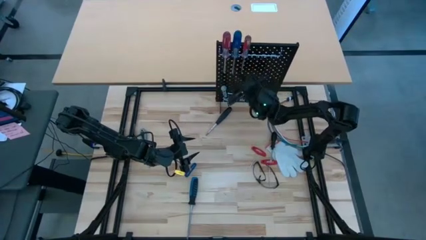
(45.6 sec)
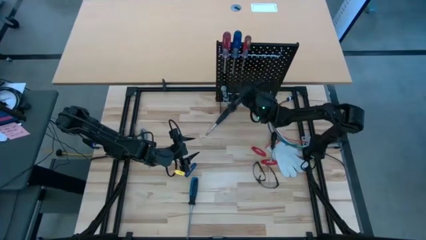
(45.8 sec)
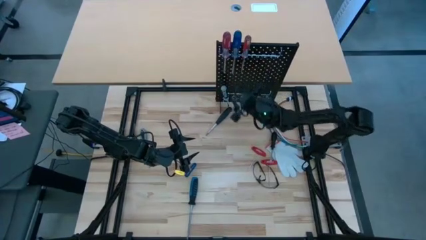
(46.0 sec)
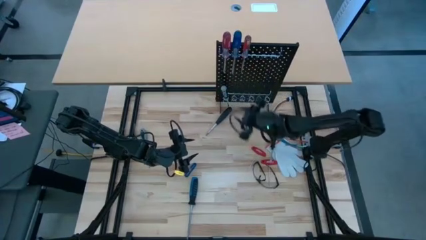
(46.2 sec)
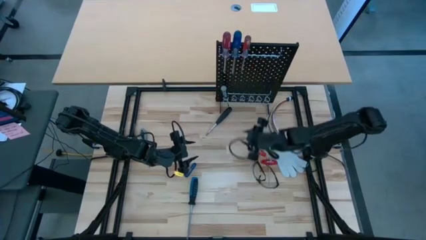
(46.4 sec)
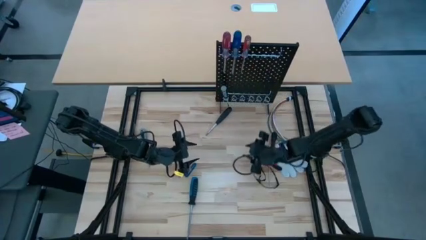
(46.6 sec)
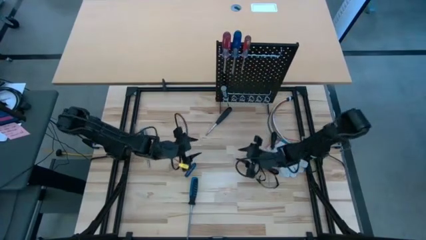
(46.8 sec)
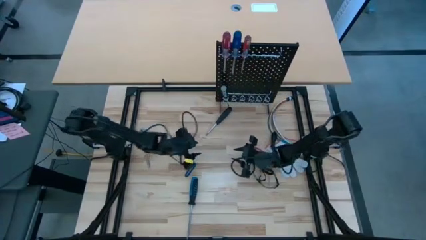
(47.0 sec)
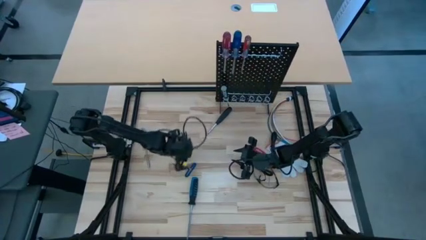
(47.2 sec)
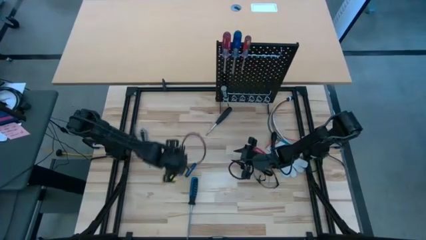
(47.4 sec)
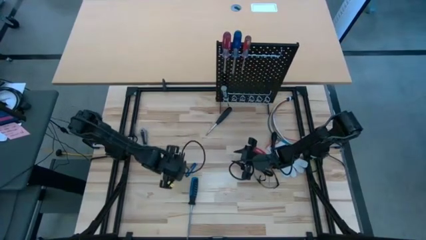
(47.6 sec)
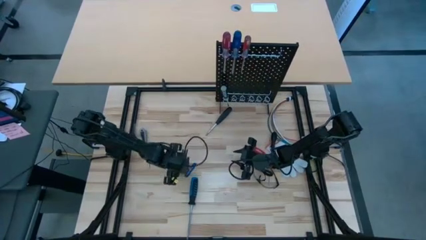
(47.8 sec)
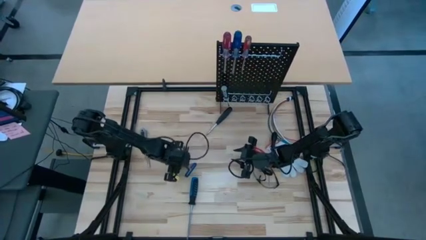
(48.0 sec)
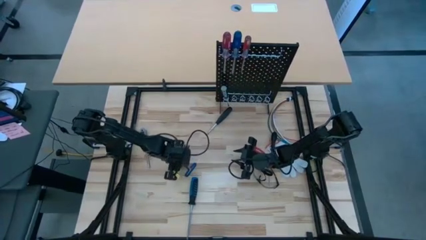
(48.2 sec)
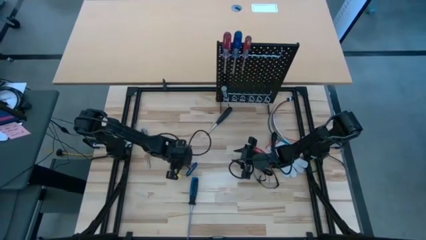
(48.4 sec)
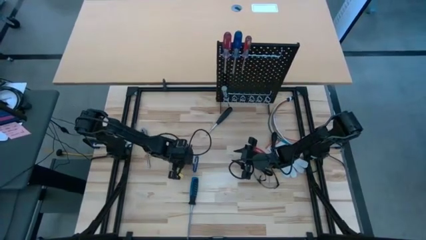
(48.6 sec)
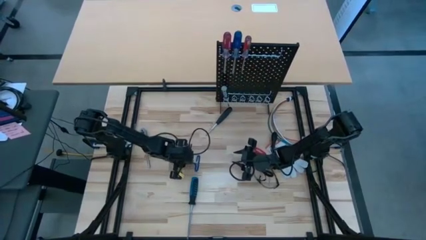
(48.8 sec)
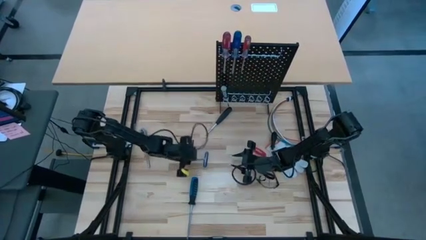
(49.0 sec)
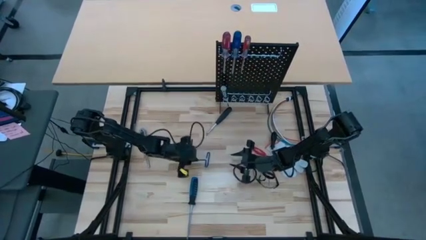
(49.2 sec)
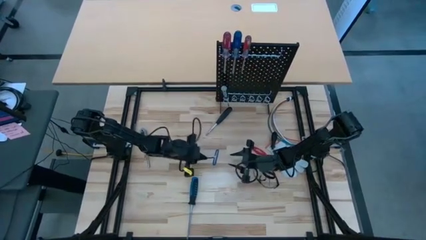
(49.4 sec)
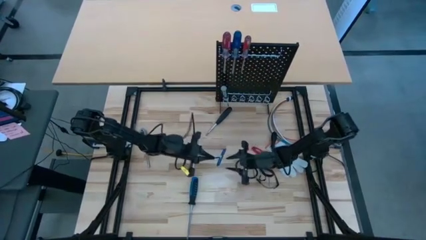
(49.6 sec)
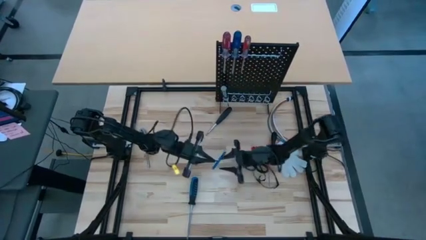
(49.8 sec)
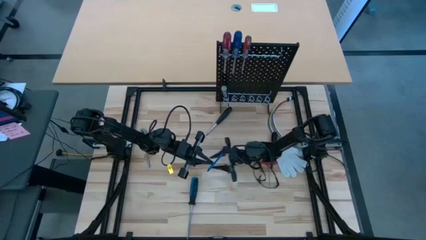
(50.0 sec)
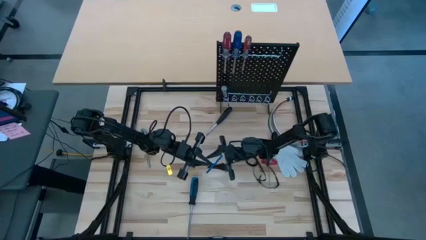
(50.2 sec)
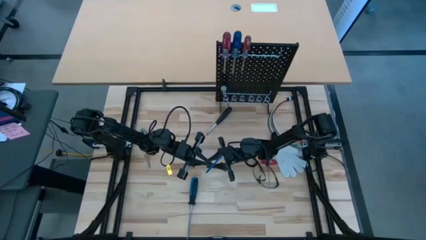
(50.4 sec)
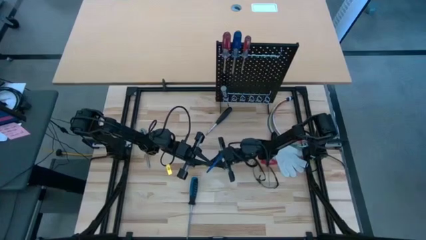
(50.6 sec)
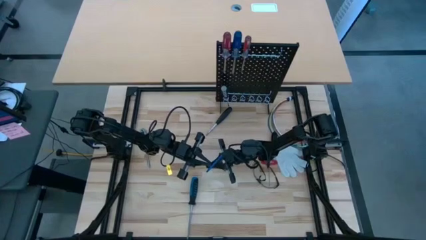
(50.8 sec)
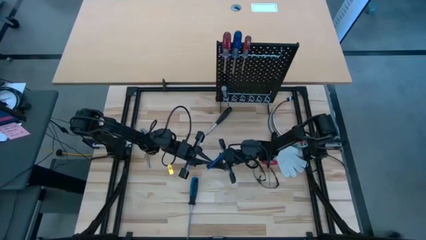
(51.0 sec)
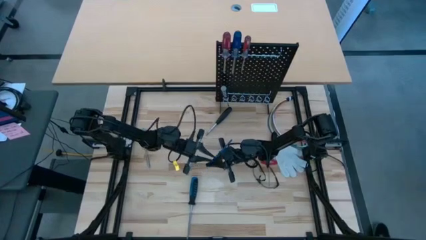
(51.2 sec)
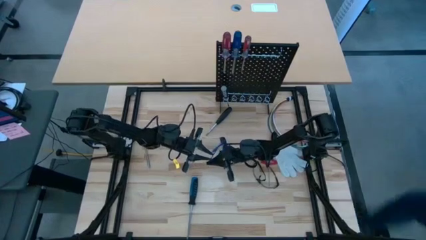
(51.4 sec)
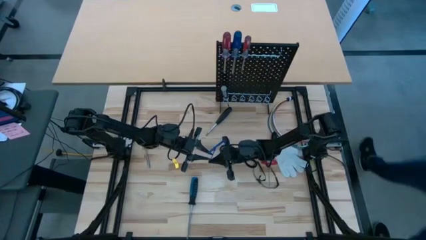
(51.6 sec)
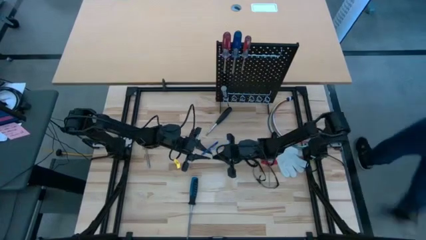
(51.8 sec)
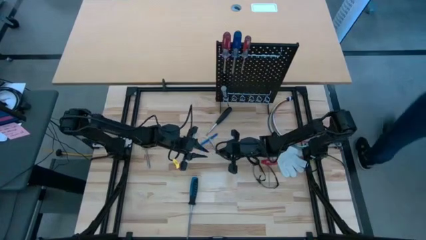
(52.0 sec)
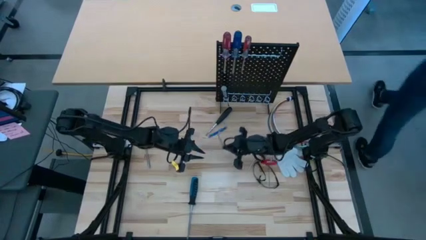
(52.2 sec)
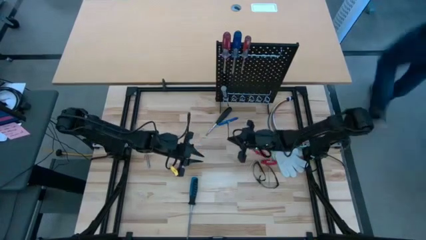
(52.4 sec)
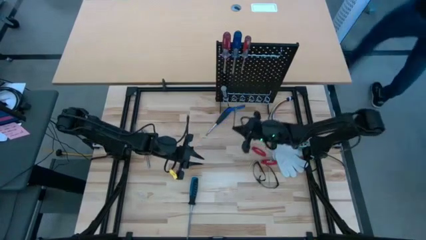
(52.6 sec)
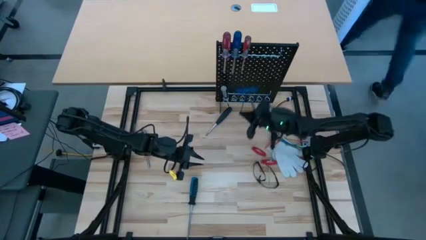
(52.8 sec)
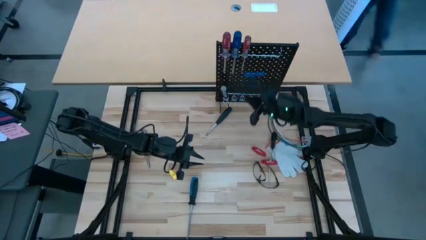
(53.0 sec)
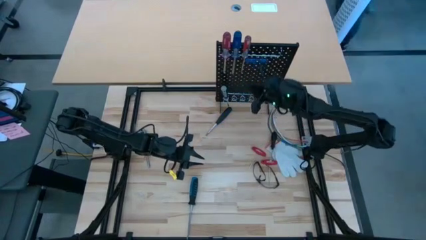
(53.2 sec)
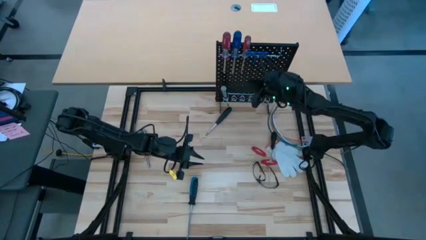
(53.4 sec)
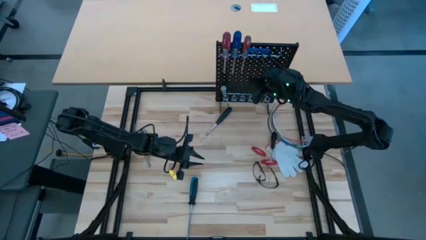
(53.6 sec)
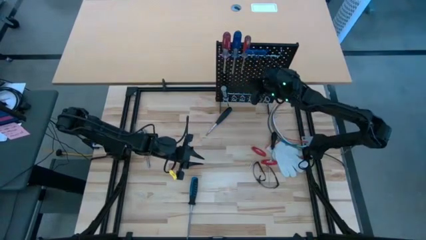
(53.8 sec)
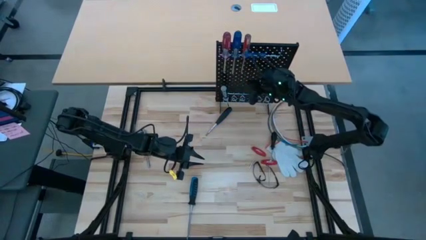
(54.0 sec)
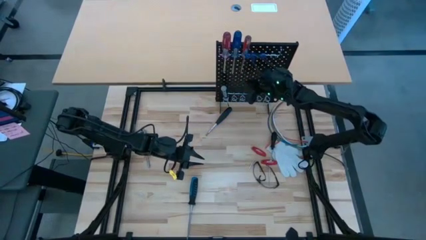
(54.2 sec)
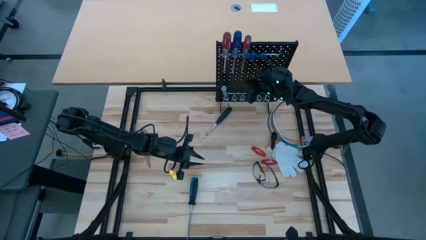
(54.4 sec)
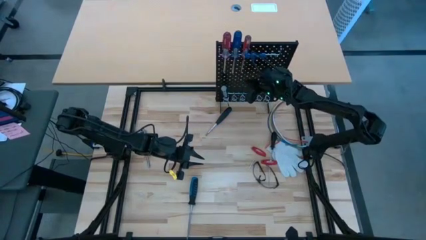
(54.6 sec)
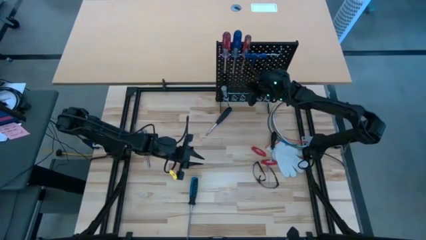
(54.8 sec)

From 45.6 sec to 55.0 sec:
Task: Hang tools onto peg board
Hang the blue pick tool on the pegboard

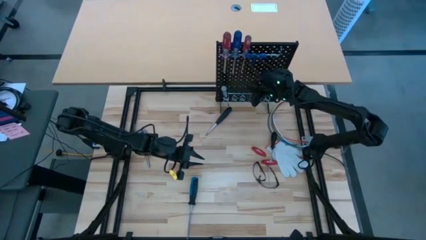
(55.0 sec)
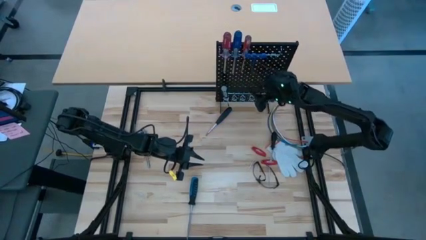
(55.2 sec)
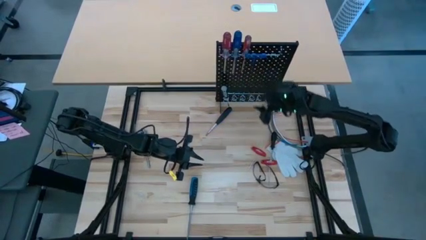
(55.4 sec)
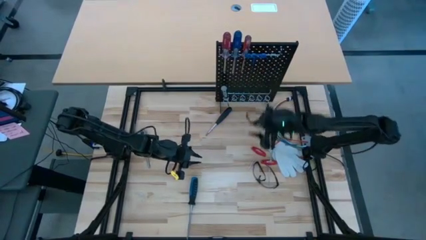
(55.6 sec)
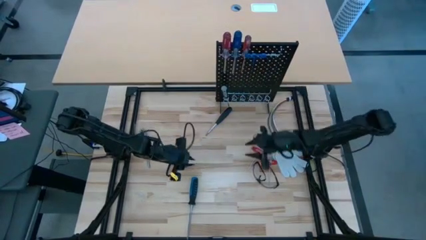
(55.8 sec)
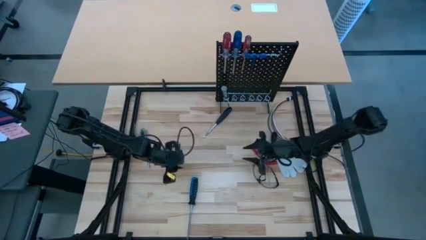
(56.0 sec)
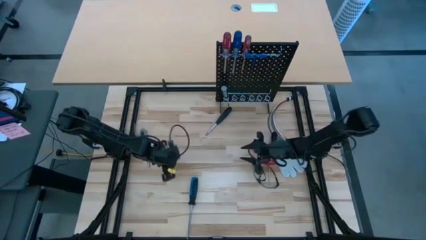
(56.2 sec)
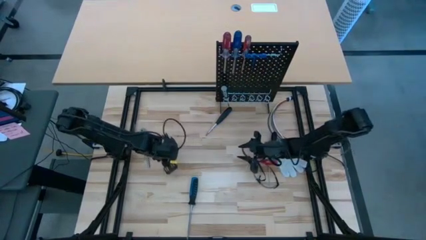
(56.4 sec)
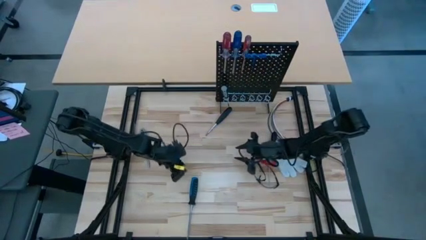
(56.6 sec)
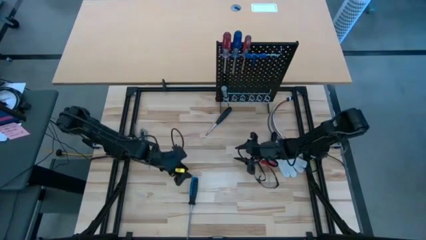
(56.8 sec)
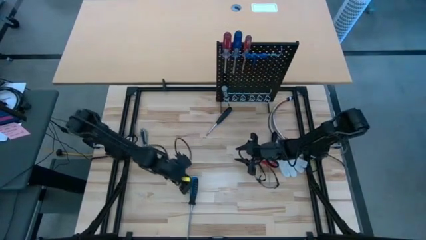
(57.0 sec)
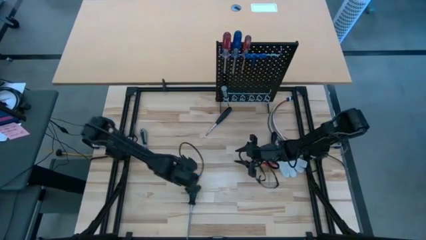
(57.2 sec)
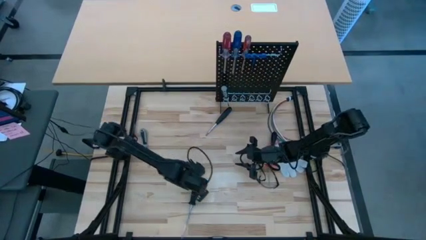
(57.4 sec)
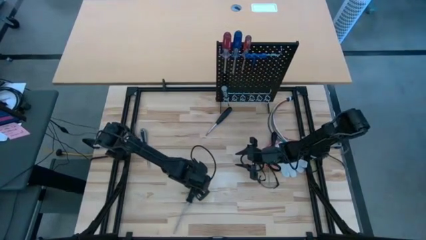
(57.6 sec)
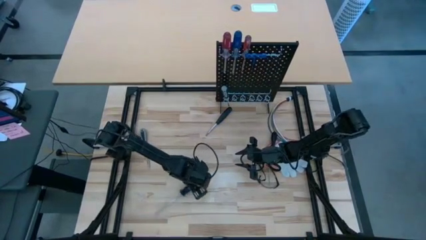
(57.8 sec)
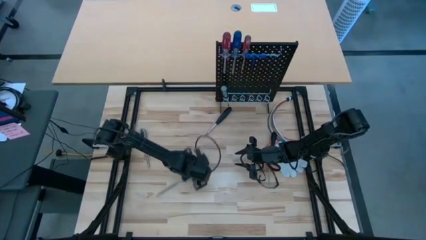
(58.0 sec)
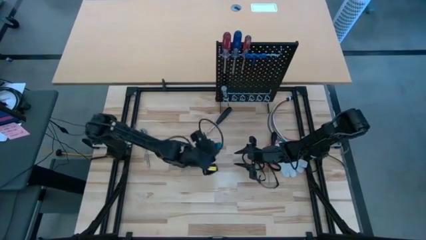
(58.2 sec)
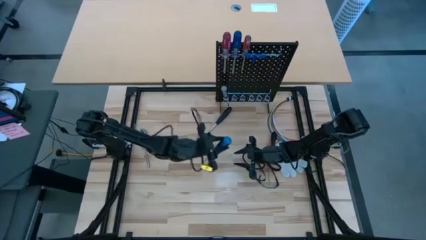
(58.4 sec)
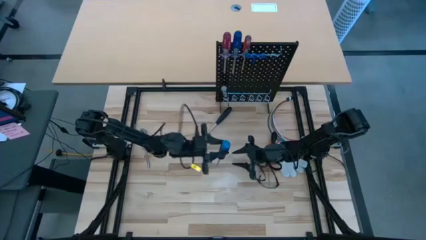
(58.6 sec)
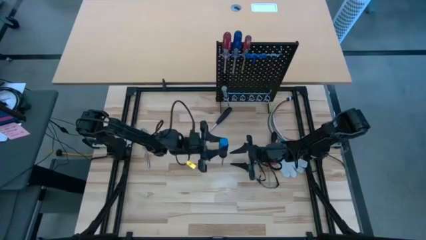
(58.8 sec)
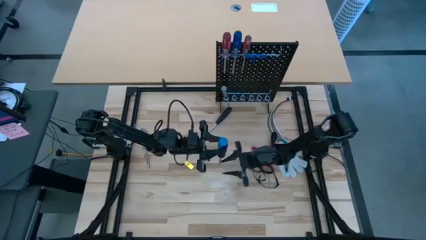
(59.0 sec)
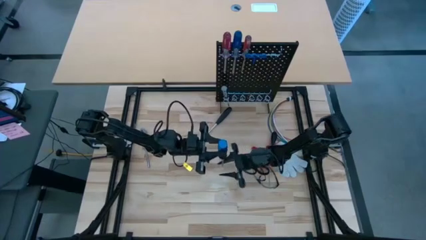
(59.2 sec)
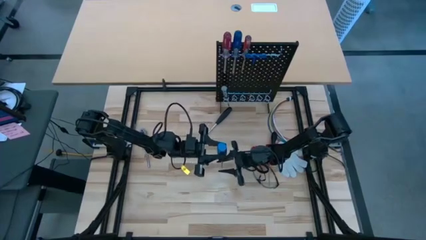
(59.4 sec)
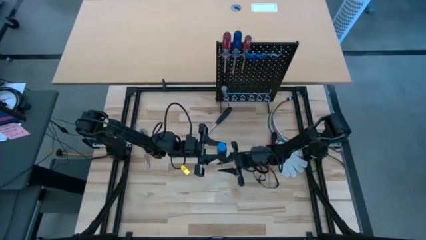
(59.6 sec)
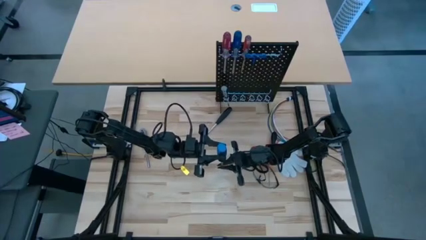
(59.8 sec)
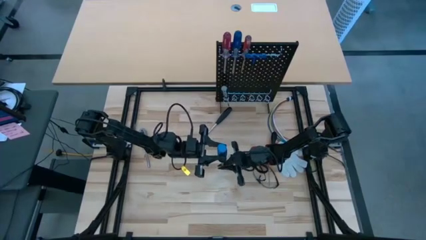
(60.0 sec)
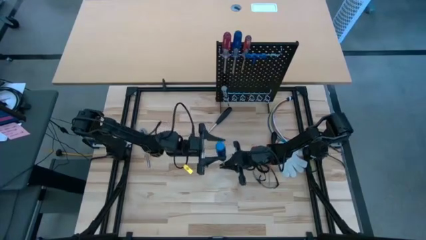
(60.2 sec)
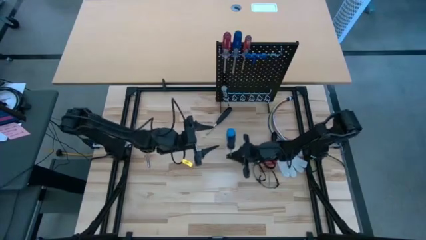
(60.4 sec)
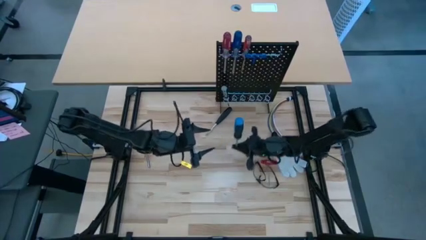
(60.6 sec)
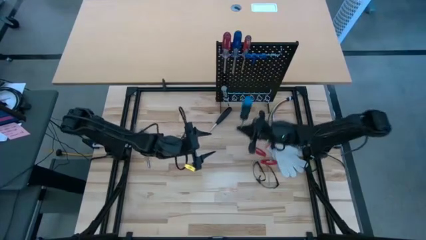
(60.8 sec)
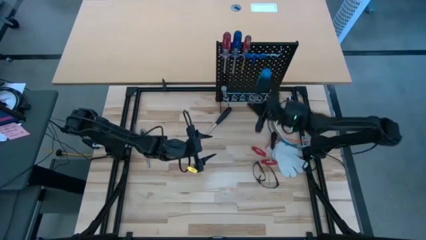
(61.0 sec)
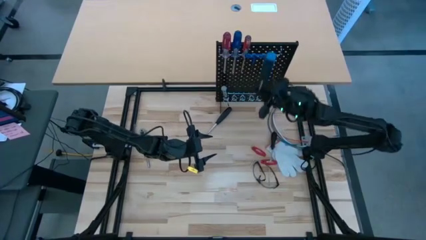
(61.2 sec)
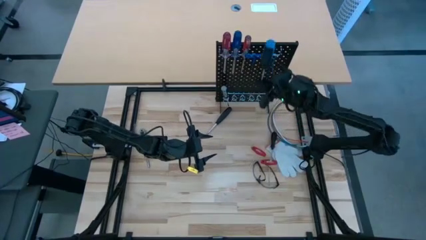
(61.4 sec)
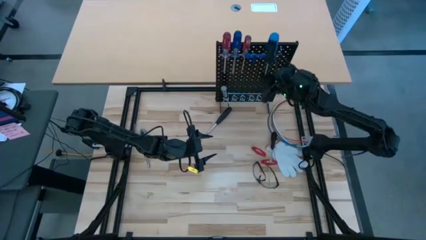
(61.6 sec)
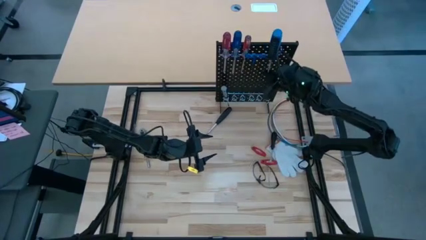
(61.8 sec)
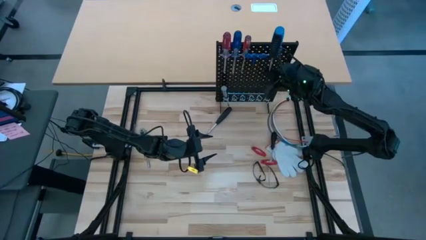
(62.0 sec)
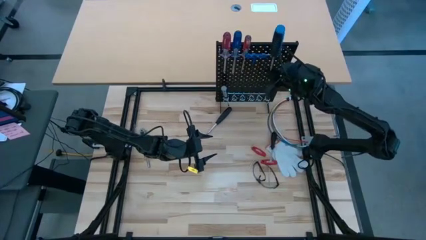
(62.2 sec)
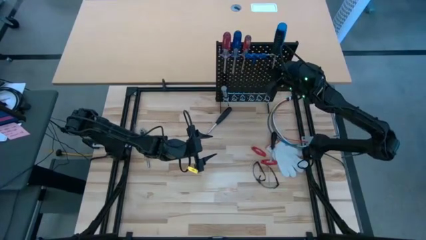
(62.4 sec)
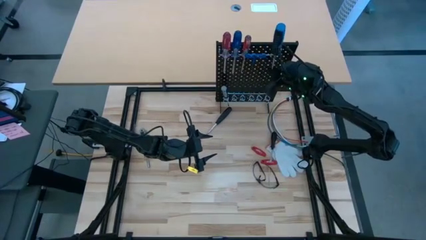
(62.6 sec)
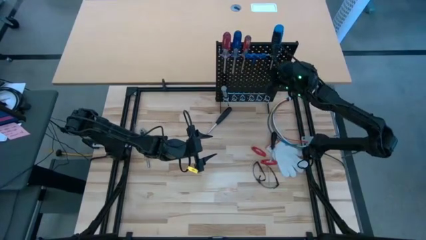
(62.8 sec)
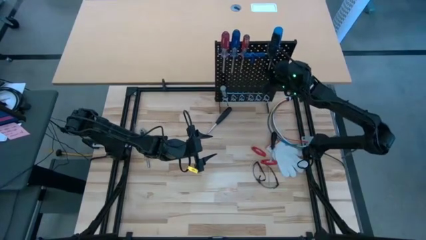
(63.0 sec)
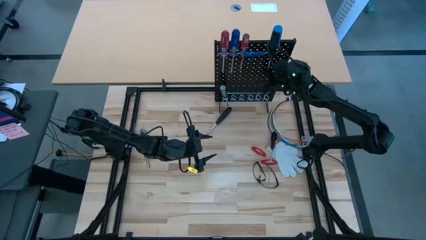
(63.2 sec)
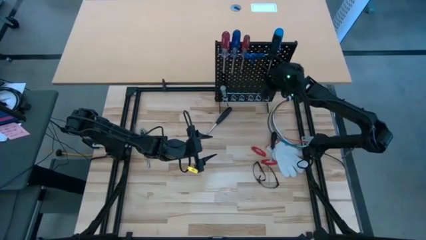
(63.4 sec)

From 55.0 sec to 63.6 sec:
Hang the blue screwdriver on the pegboard
